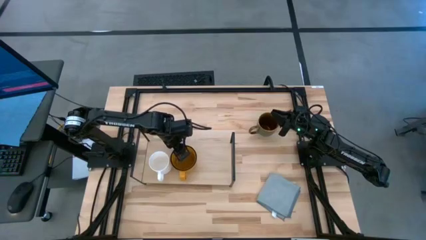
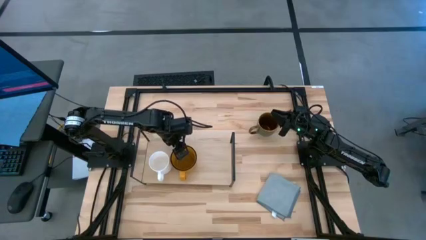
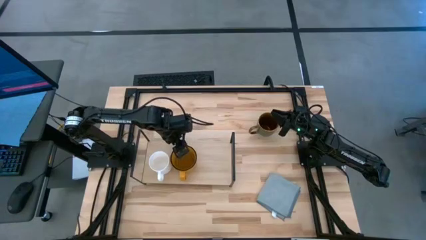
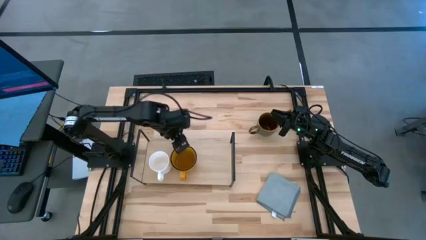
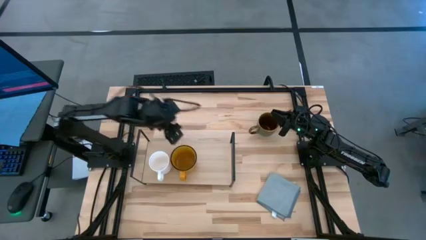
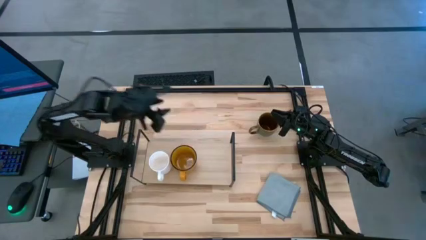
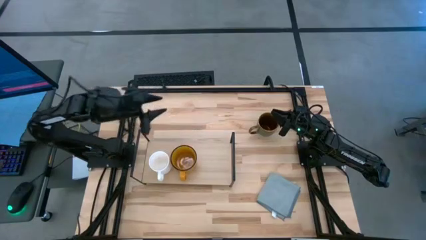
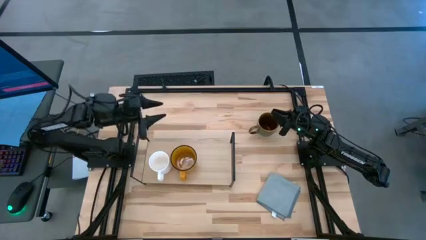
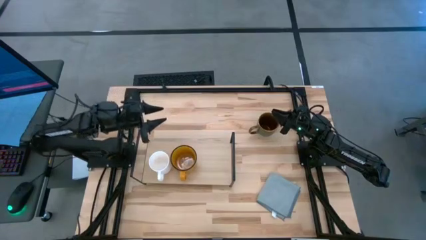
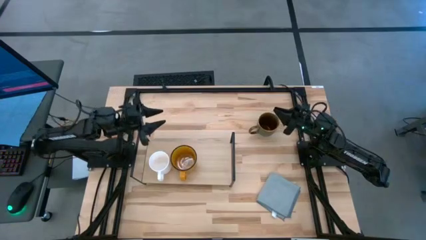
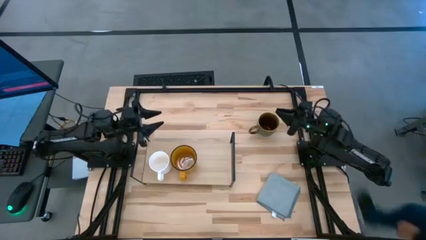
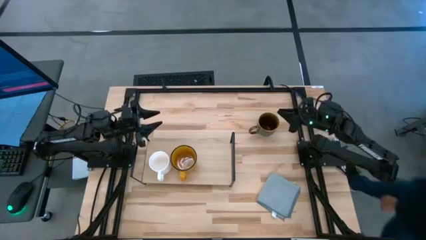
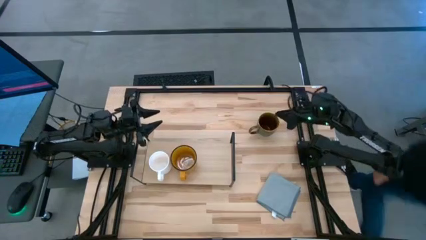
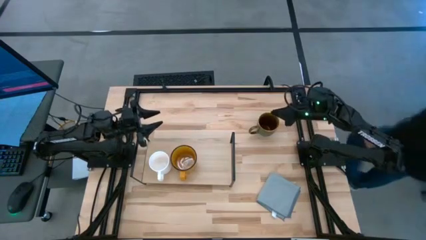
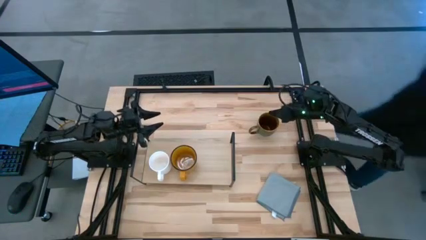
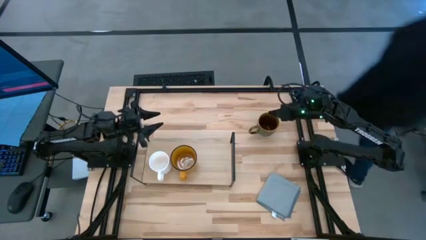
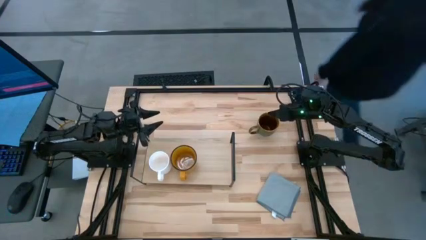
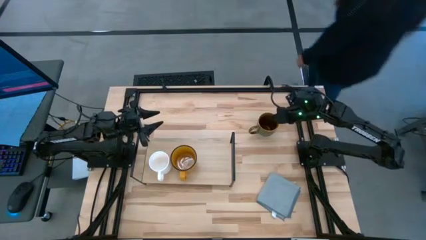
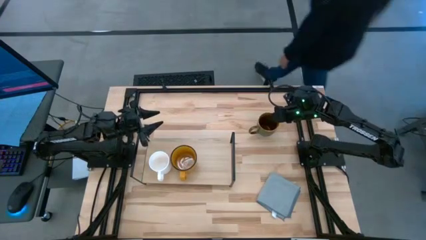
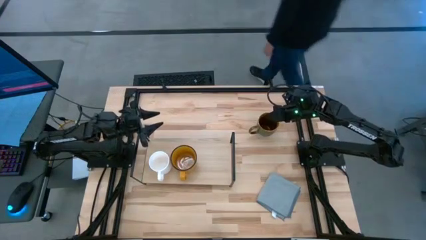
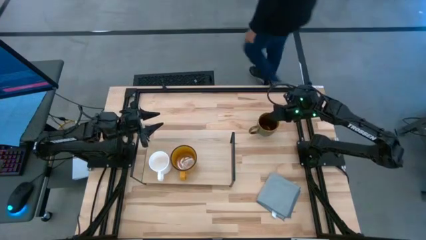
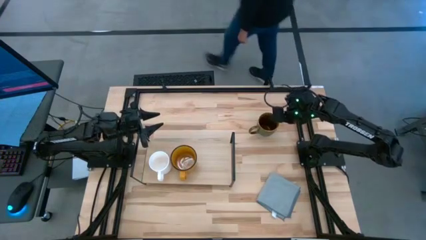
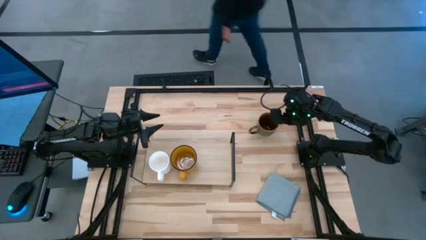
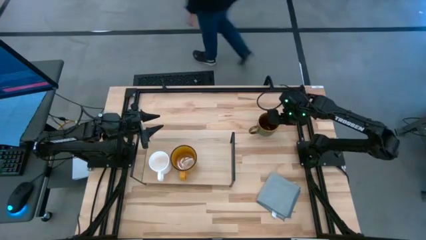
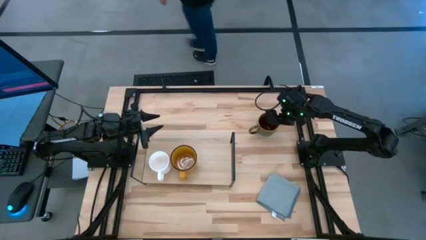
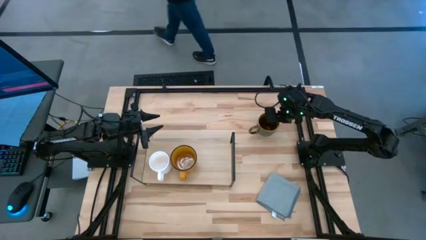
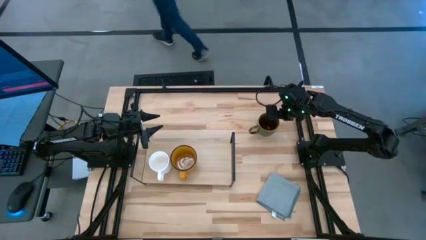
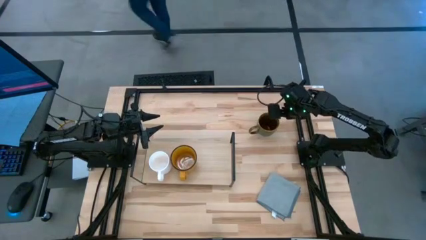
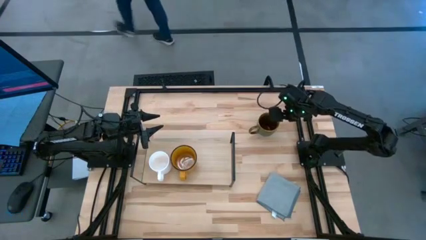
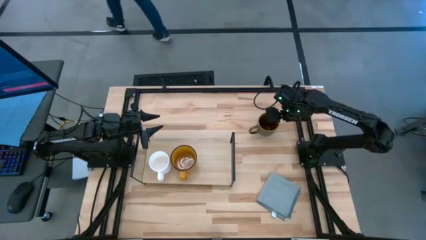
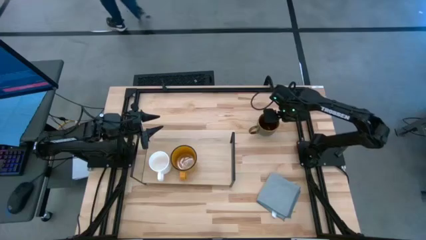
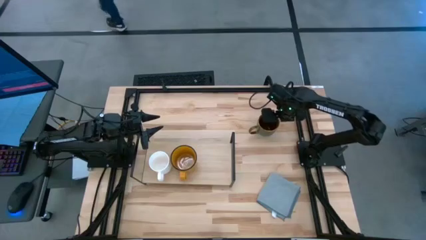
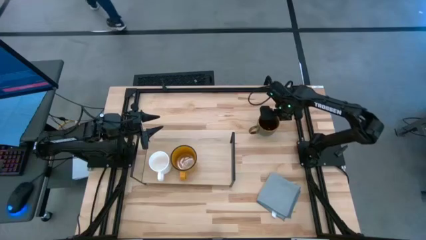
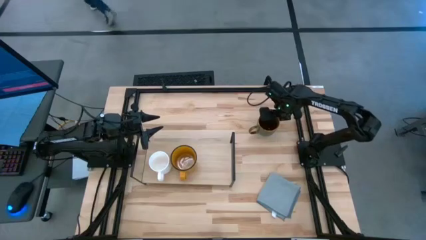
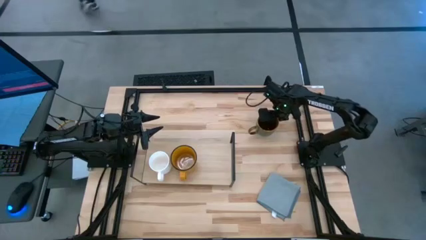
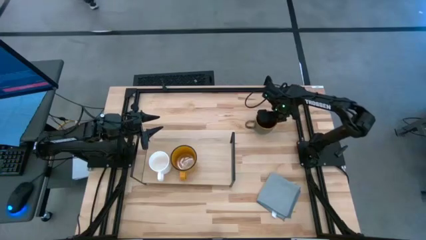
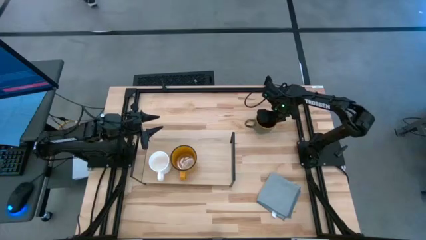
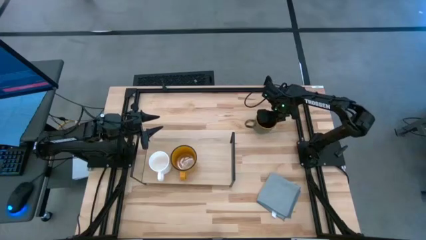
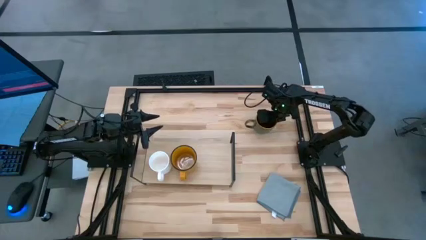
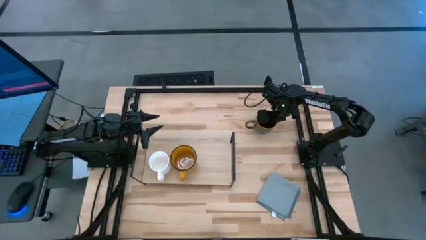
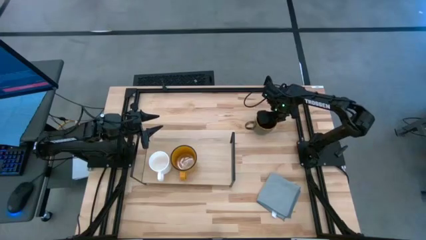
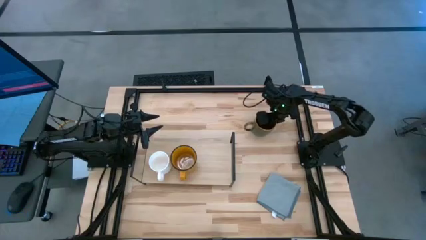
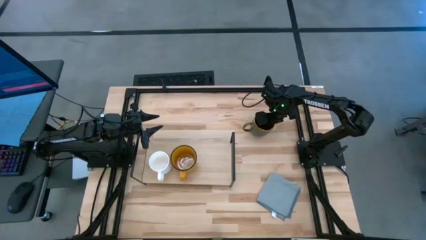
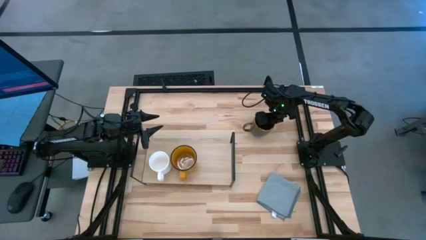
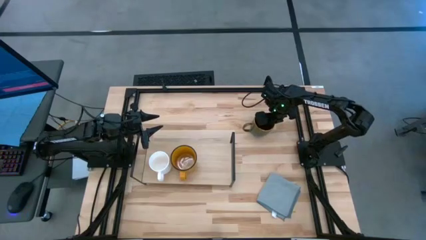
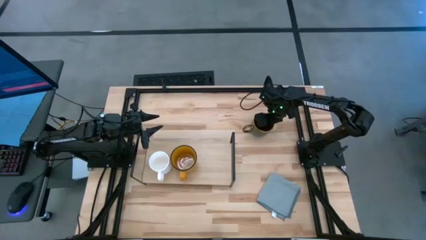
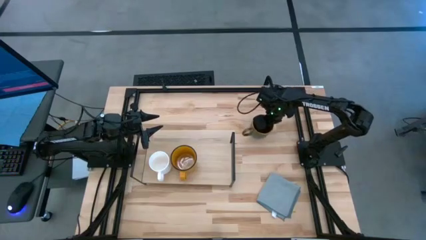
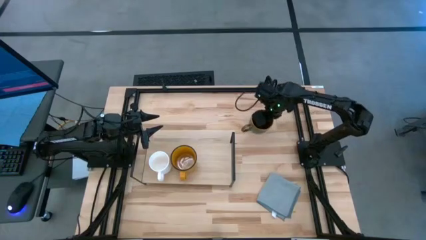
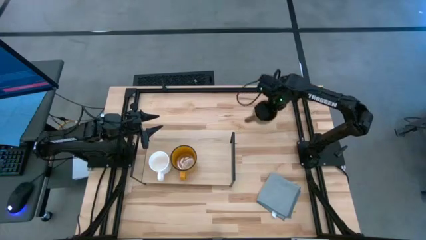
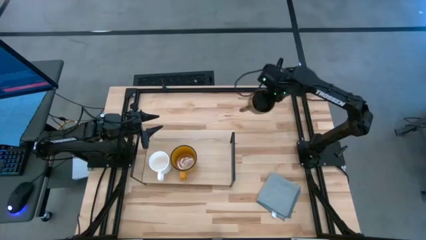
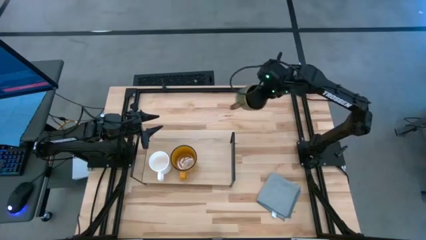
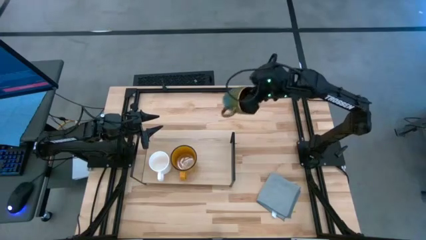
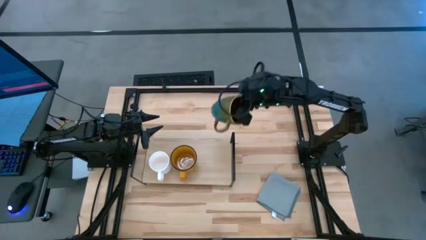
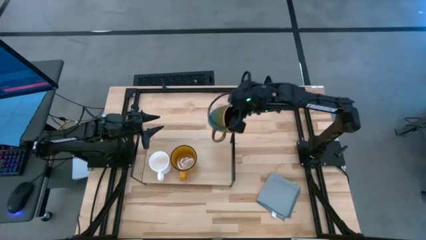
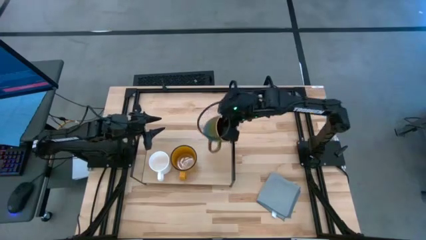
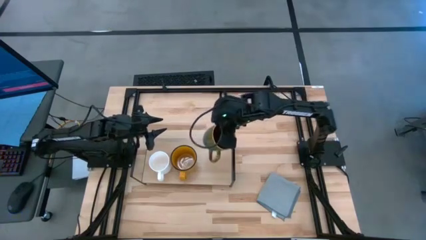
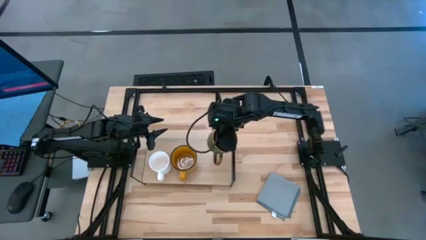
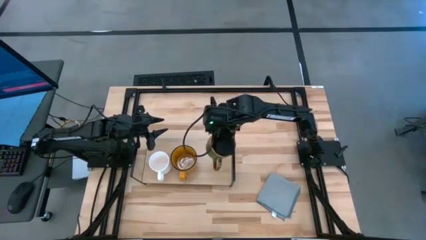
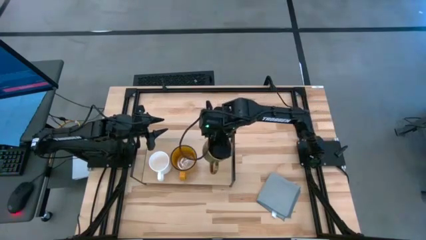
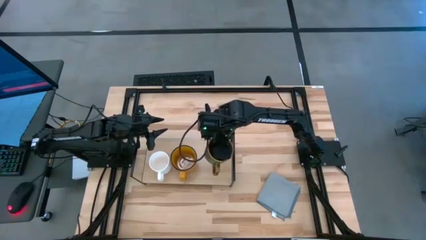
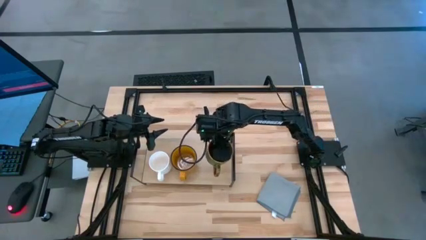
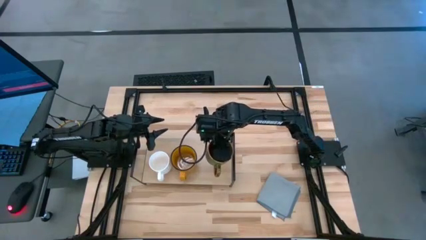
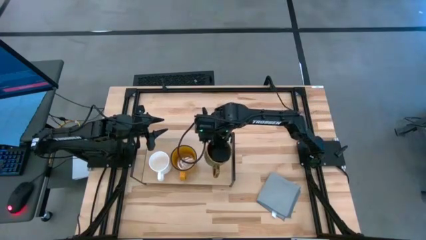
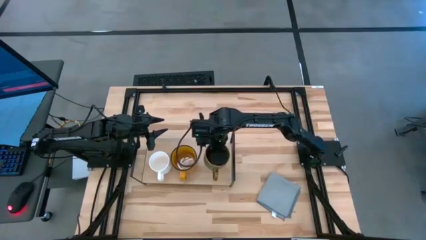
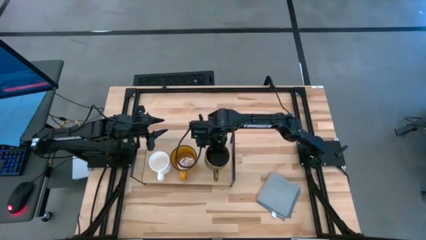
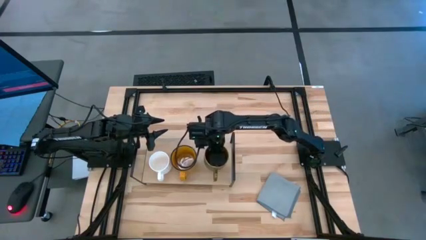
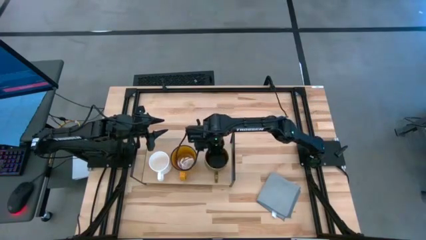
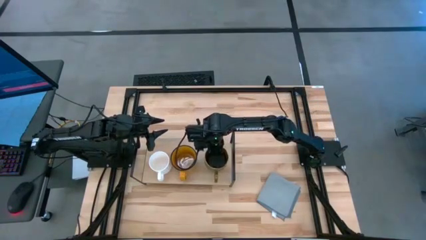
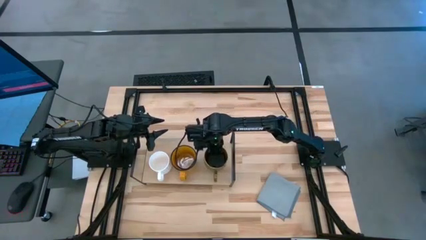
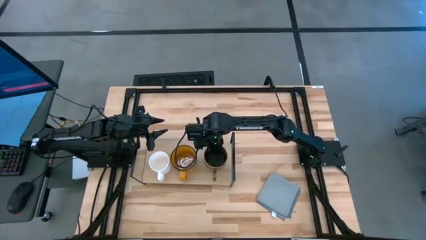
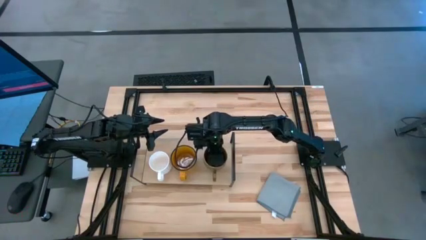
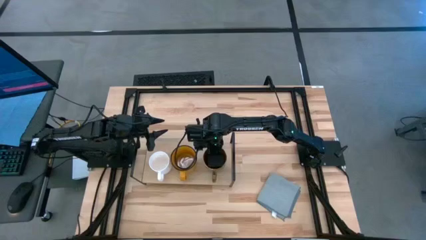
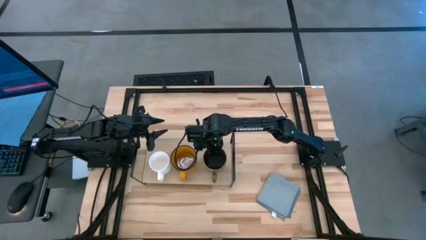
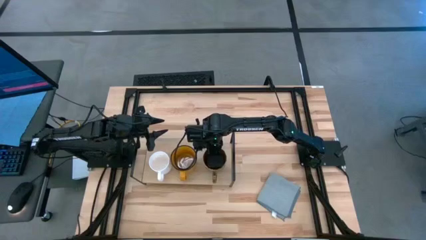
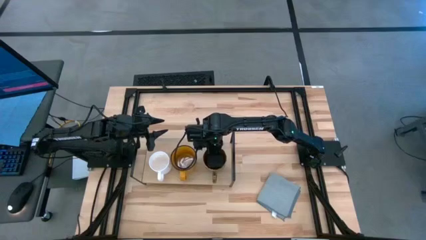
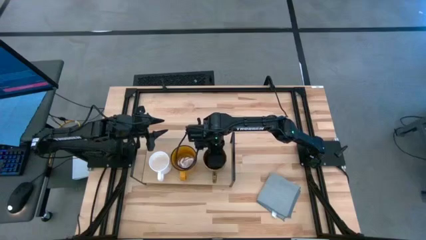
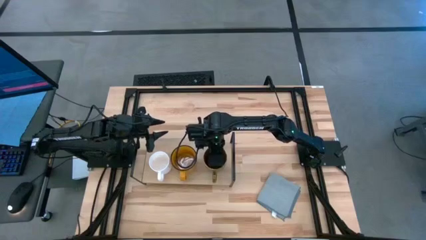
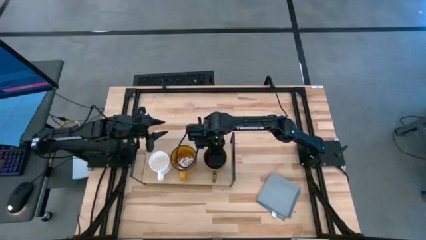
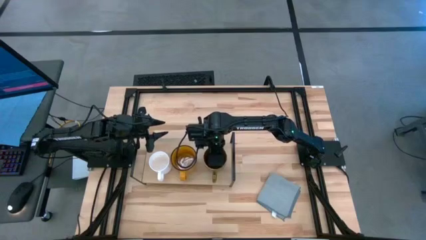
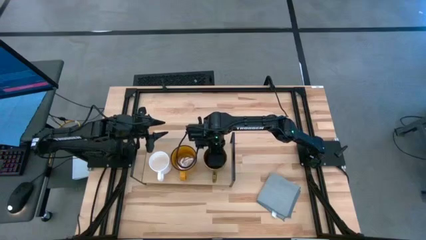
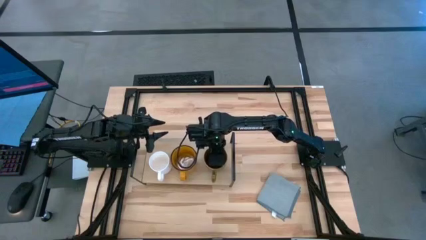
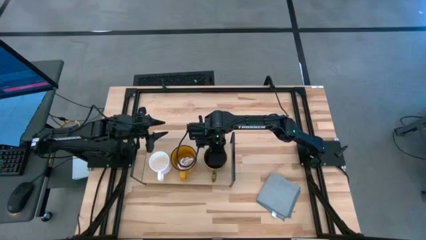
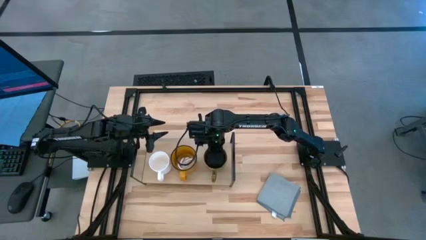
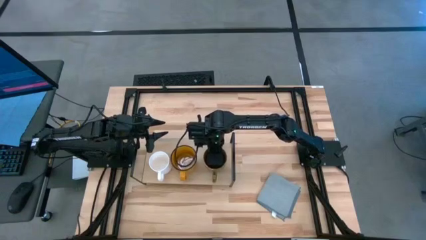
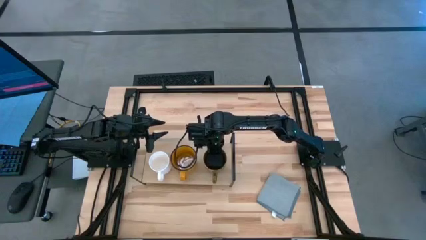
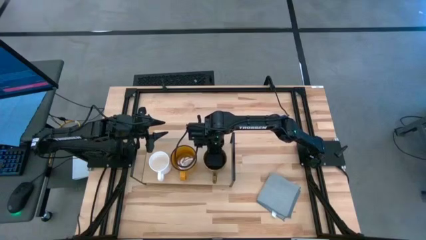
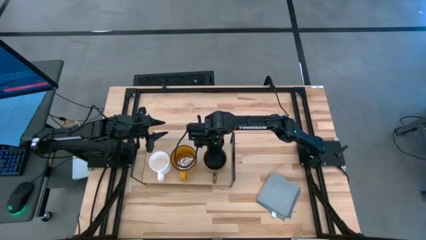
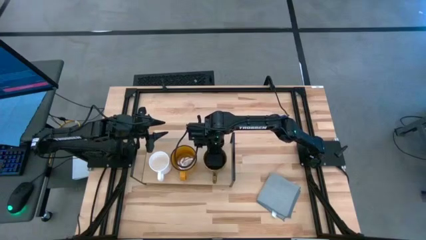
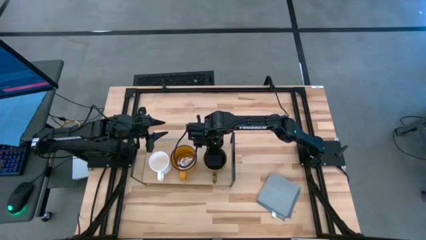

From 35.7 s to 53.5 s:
Task: Stack small to large cups/mugs on shelf
Put the brown mug on the shelf
